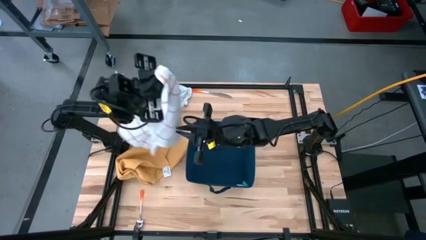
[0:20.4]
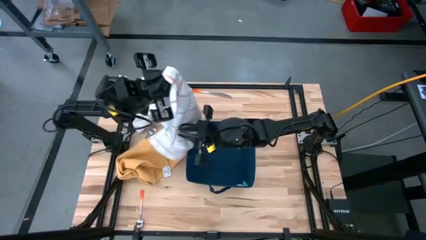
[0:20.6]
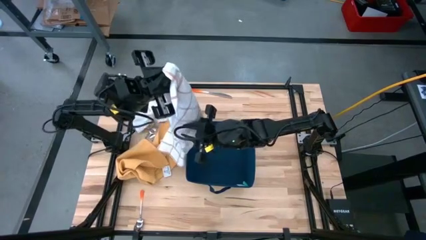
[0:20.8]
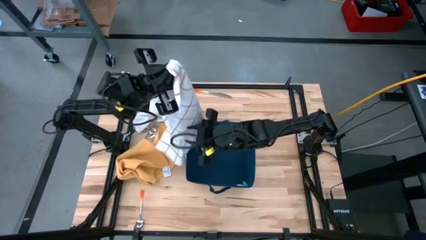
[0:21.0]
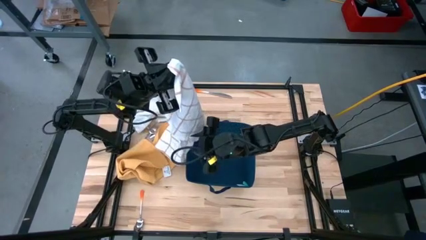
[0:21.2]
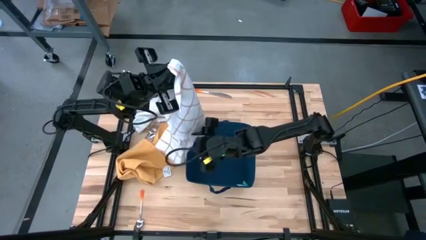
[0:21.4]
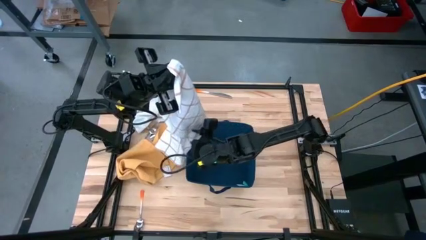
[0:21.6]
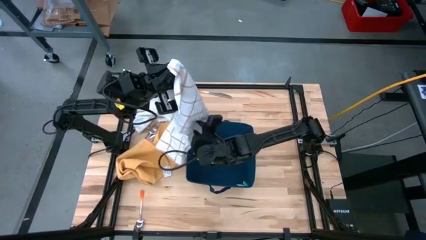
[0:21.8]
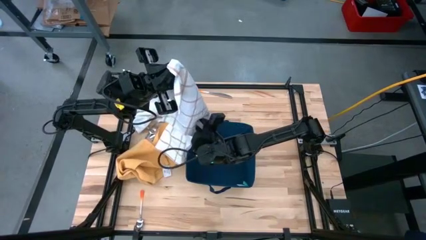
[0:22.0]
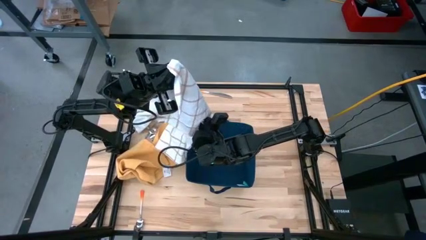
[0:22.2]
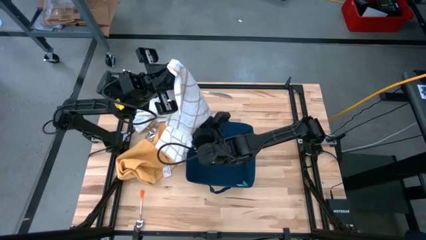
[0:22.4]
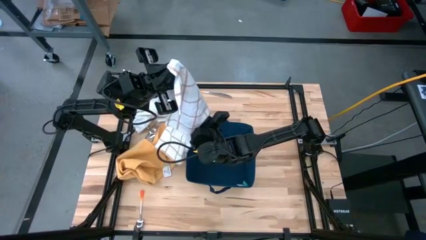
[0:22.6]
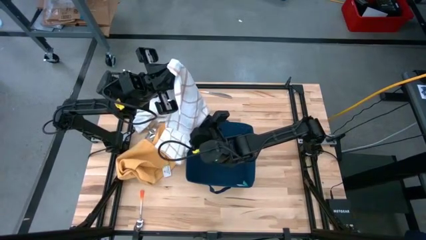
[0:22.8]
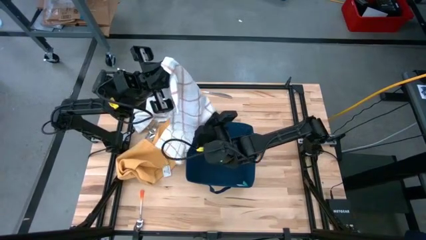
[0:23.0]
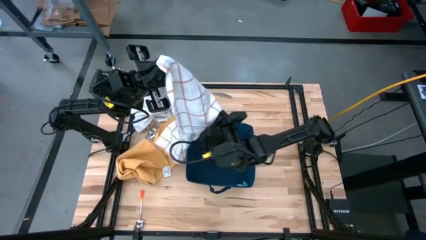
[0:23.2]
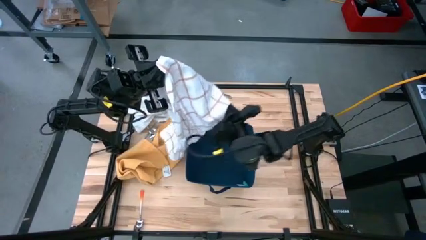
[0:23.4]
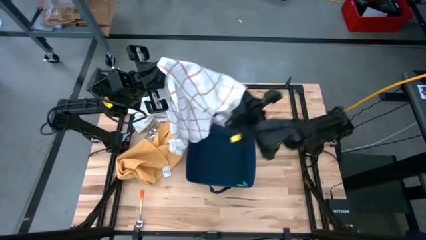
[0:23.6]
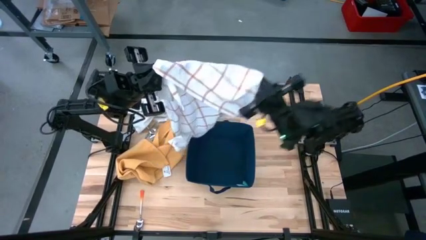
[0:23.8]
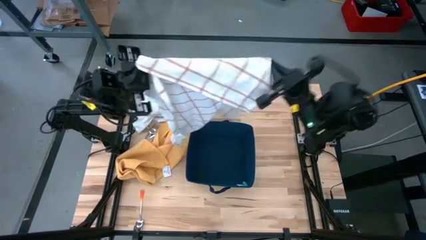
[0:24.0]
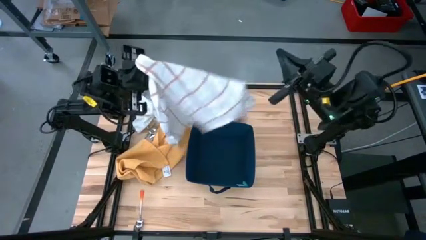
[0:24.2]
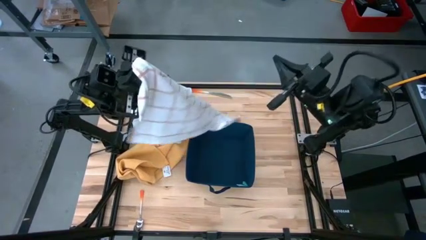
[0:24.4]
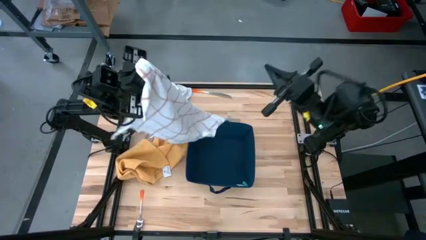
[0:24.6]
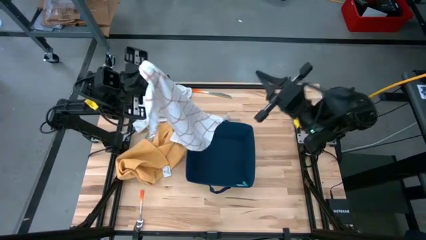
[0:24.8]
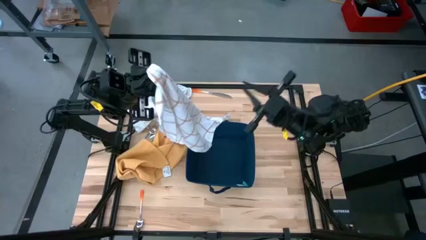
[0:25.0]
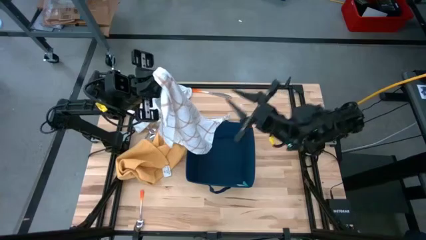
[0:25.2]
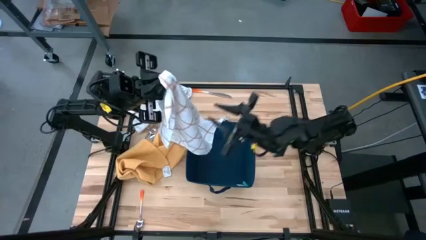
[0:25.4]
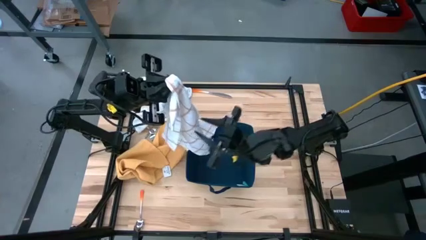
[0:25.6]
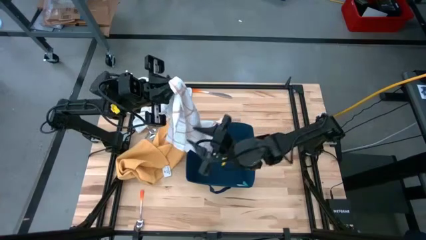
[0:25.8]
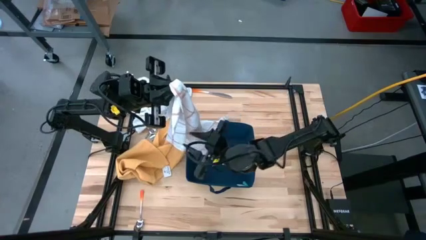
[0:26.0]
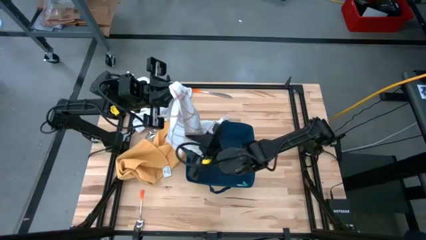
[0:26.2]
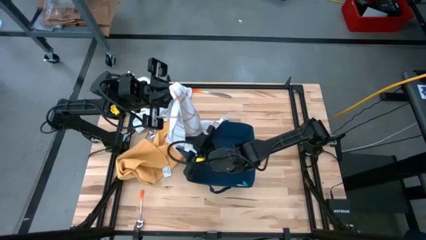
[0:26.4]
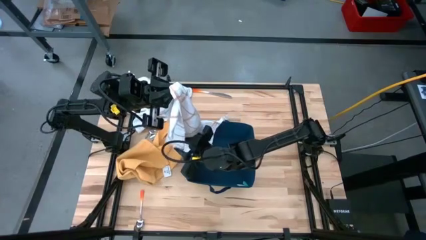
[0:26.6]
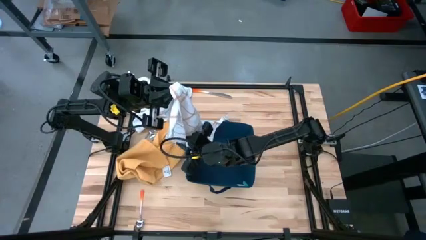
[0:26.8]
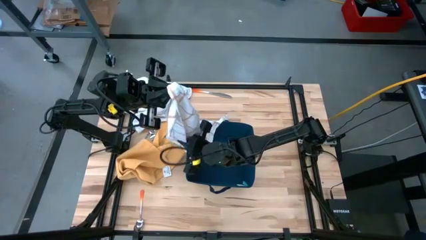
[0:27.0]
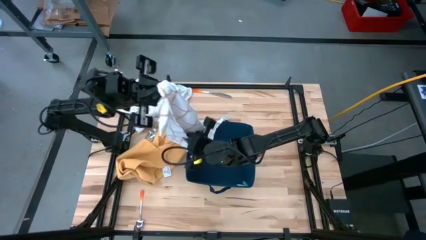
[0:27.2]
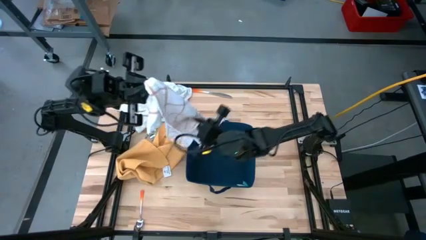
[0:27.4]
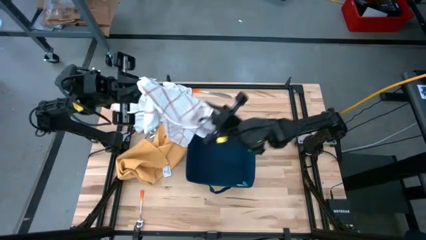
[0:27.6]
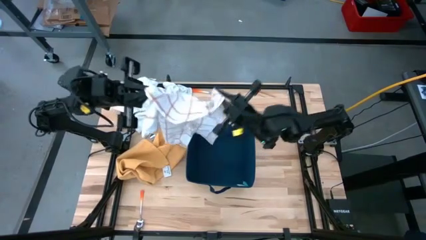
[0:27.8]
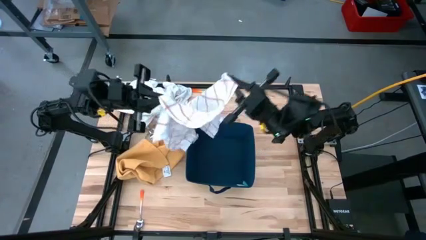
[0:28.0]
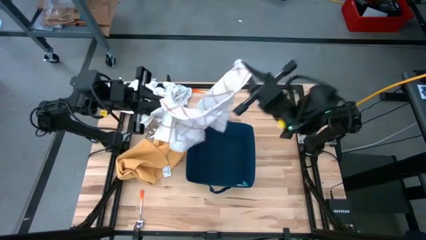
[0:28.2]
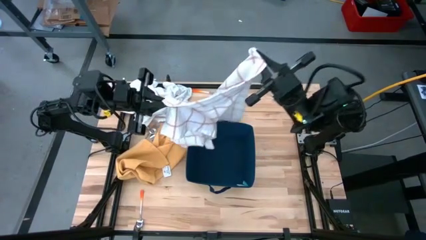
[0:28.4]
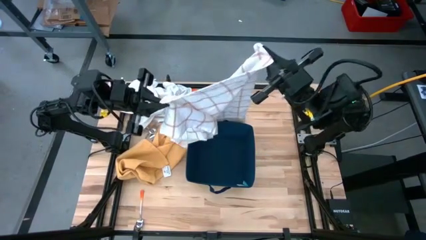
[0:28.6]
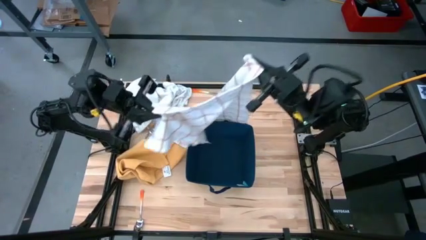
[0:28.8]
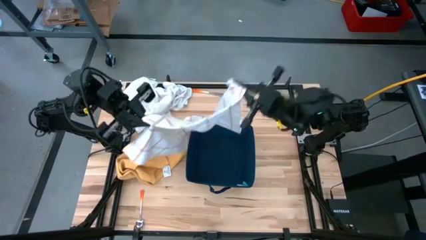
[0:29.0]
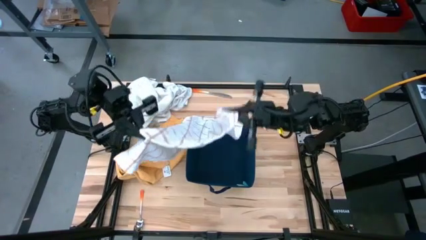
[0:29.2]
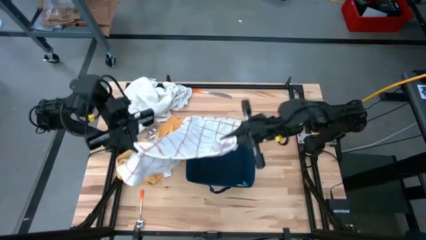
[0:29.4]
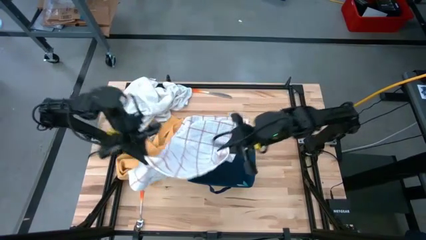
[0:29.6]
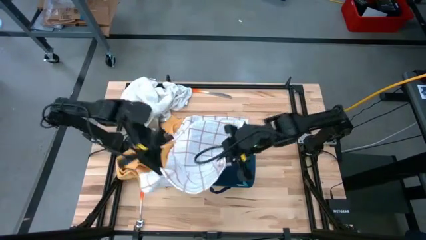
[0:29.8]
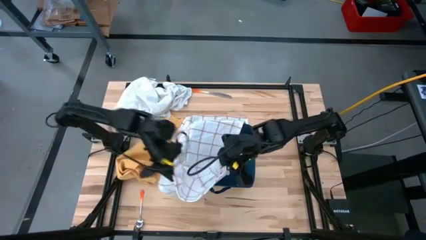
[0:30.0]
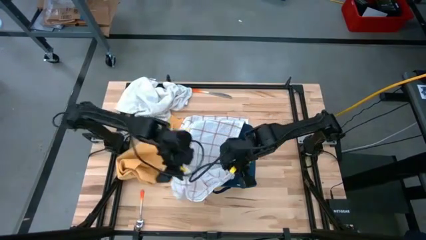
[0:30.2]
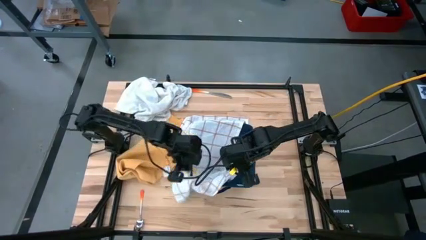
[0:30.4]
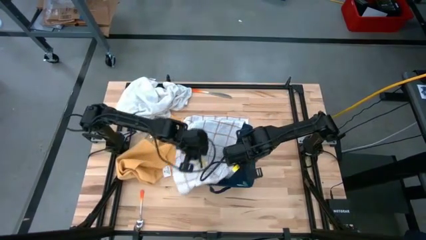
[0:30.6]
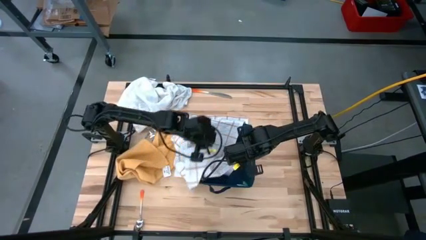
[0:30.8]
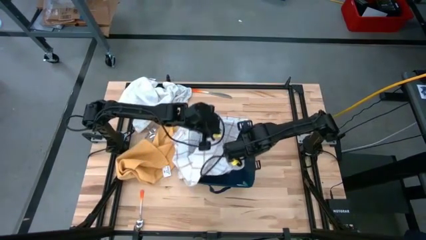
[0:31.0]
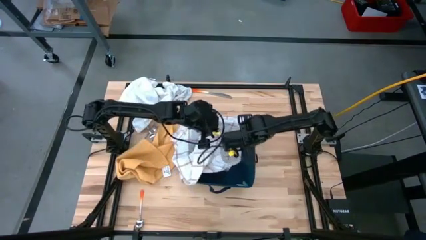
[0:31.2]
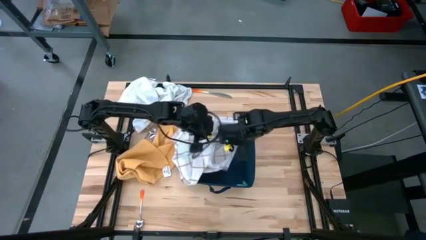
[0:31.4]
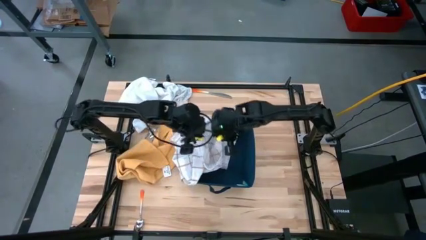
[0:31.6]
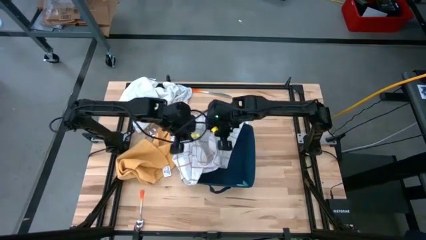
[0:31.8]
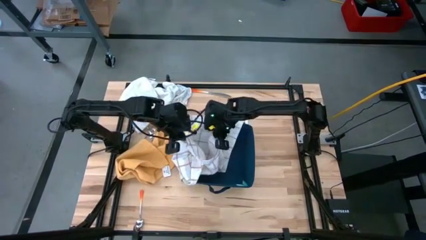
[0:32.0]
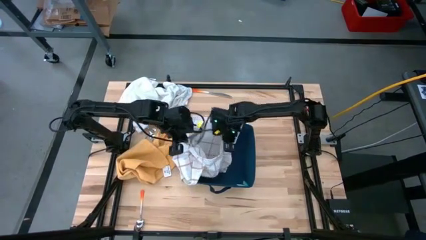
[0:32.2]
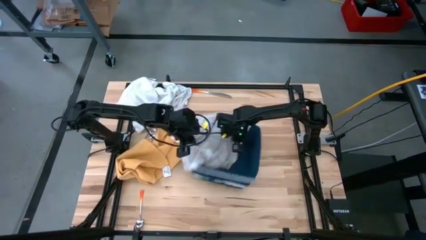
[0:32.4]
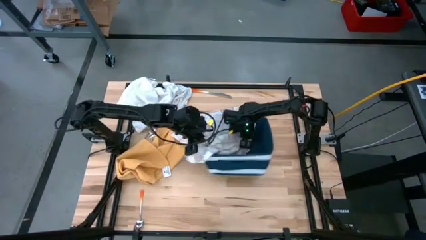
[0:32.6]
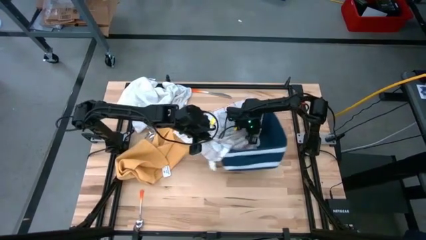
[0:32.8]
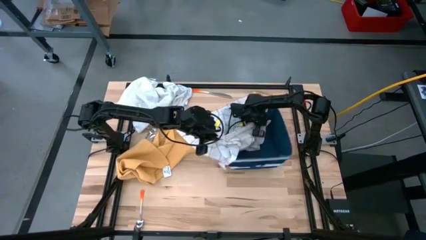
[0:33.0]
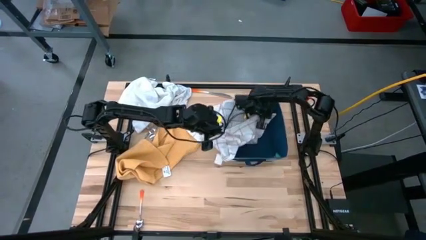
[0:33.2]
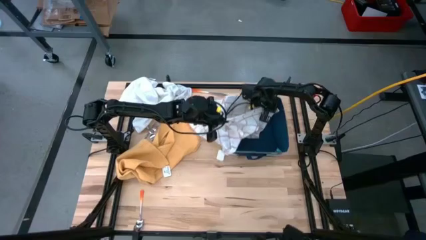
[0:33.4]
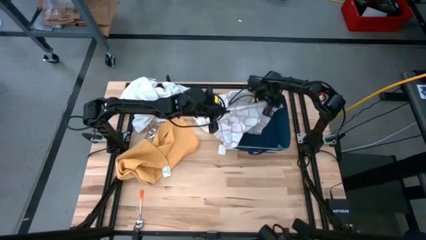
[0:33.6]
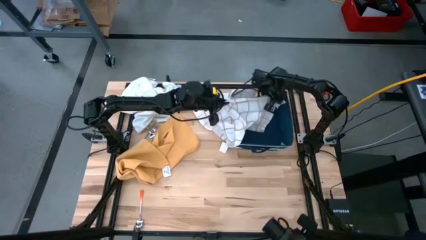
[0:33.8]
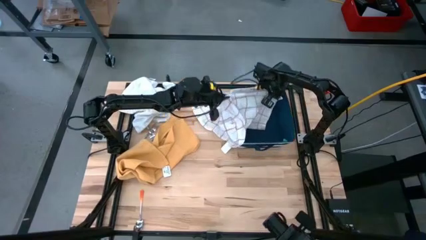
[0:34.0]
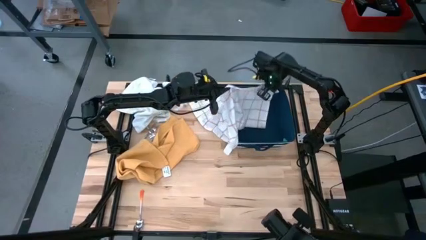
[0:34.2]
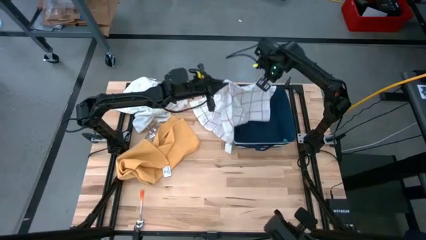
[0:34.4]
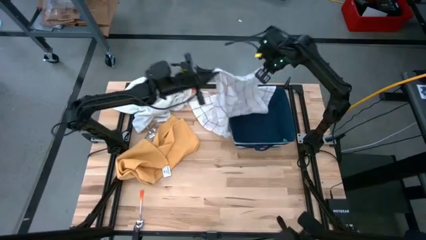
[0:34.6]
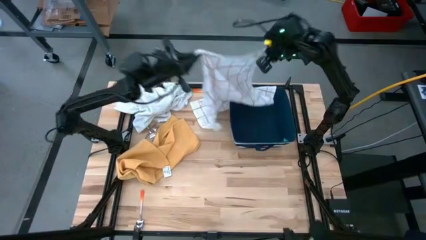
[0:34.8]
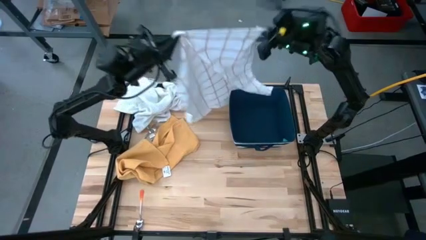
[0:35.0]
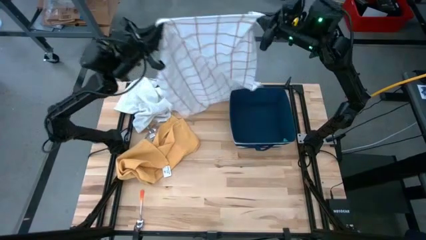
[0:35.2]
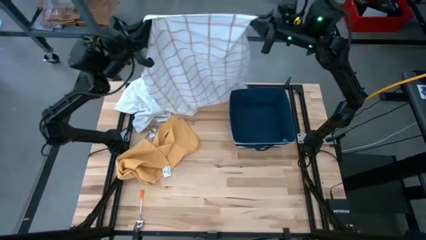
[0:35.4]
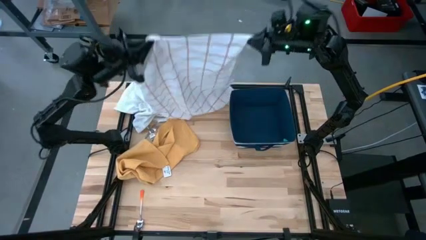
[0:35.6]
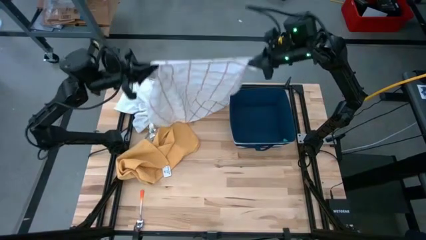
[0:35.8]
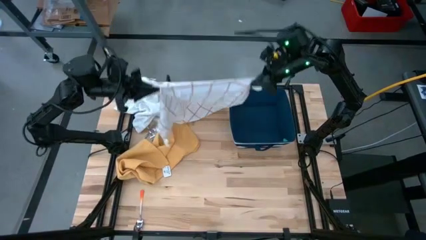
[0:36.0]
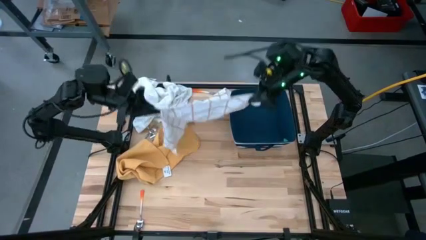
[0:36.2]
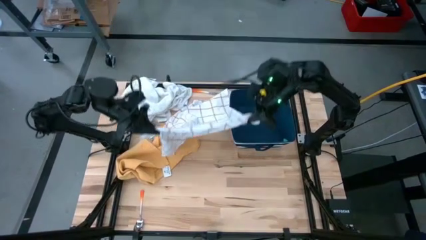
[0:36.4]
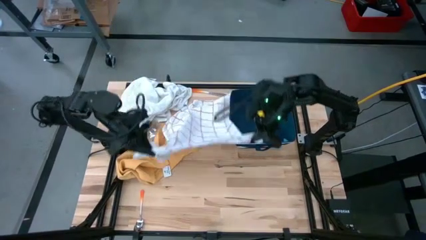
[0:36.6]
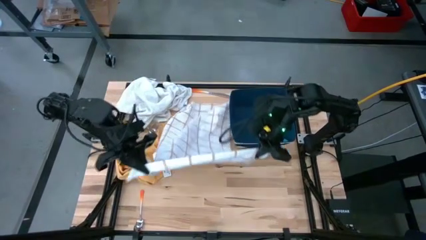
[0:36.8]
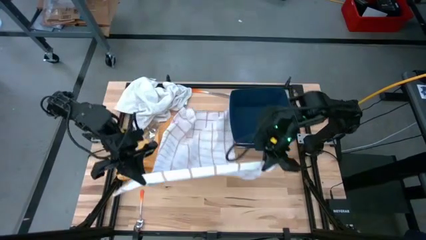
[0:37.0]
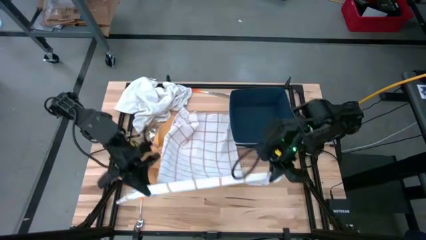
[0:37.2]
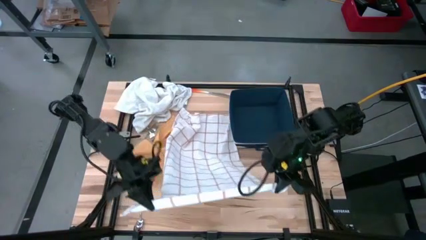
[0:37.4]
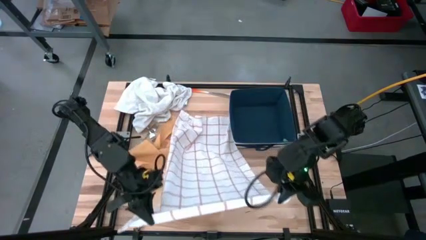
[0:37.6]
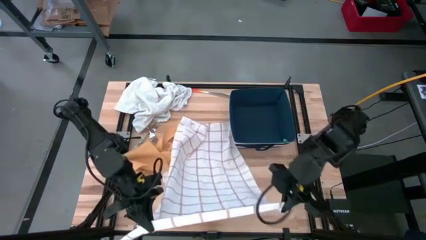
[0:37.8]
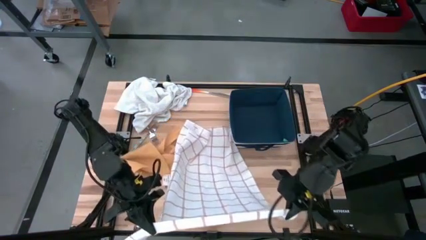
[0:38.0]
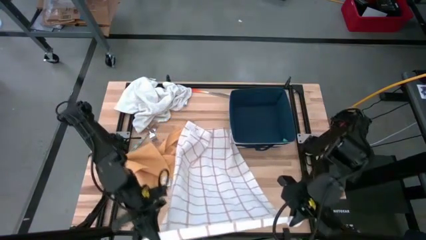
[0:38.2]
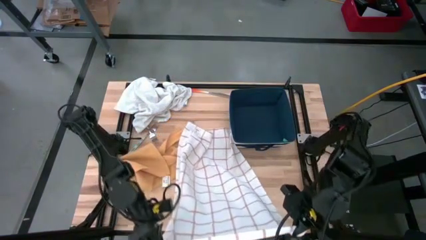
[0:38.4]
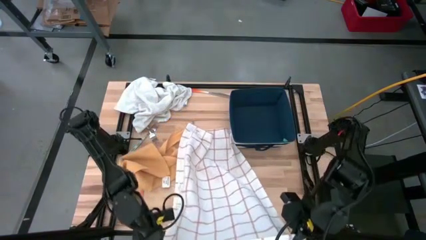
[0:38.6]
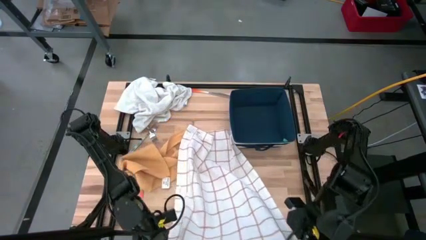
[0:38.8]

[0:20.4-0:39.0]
Task: Fold towel
Fold the white-and-brown checkered towel
